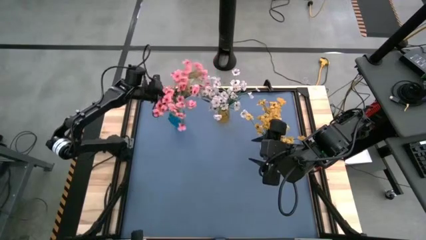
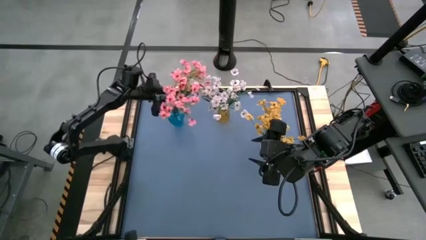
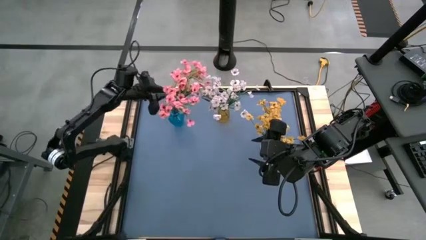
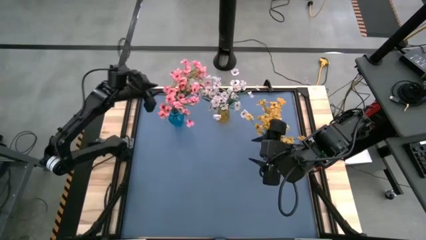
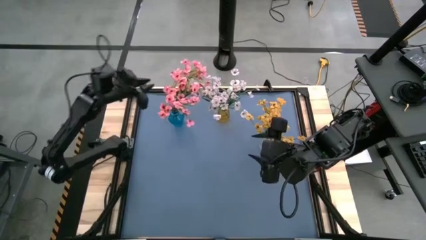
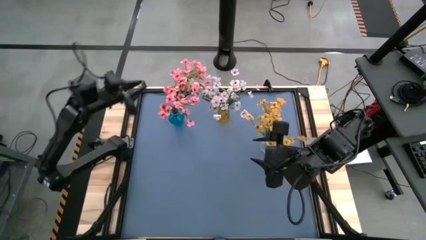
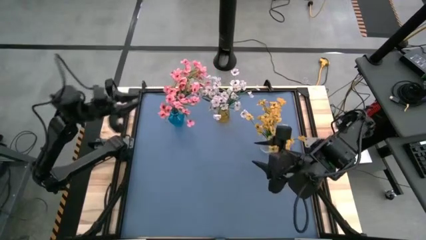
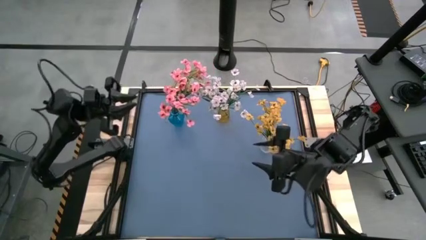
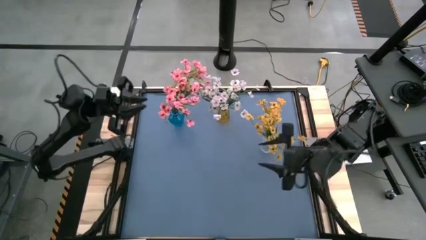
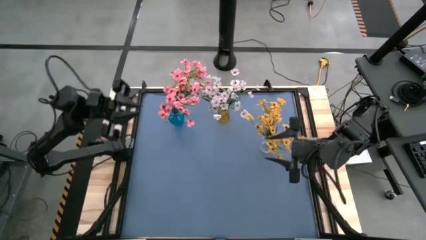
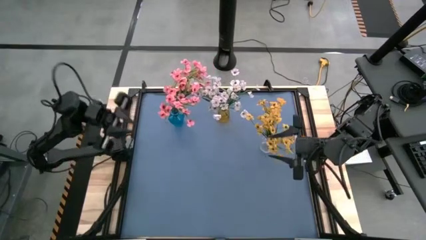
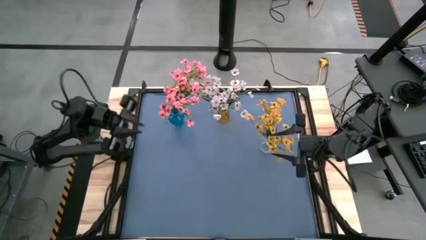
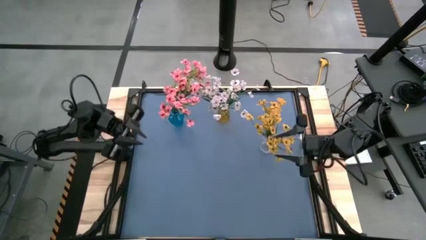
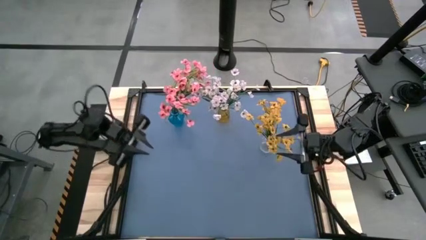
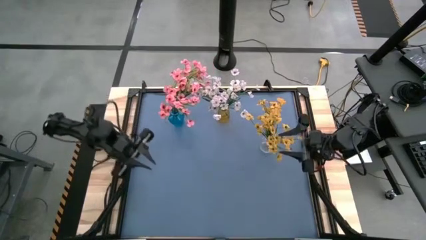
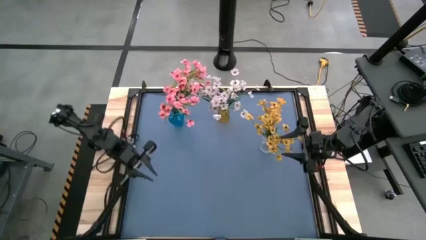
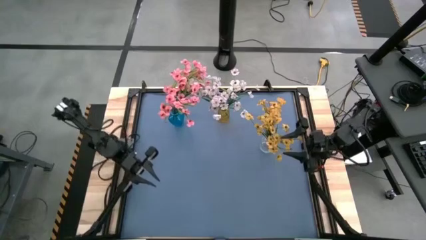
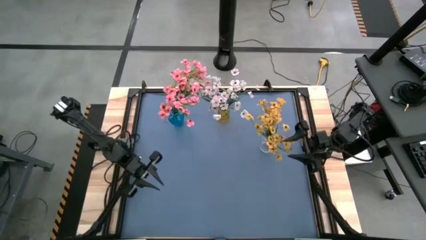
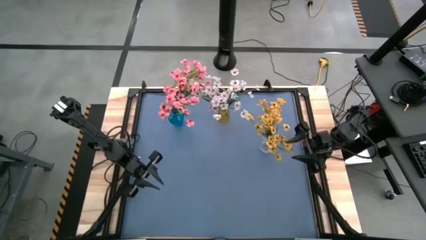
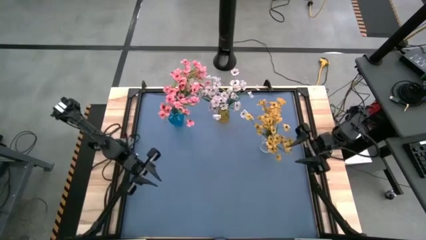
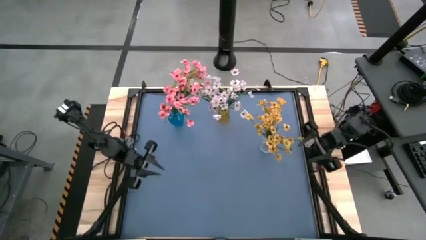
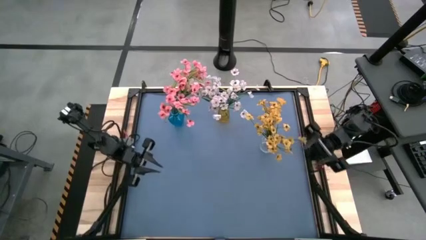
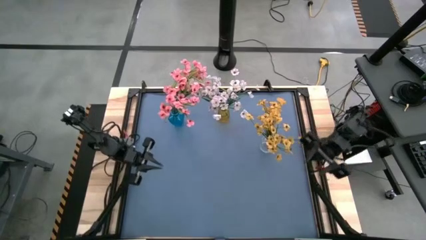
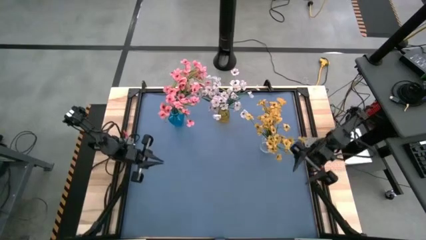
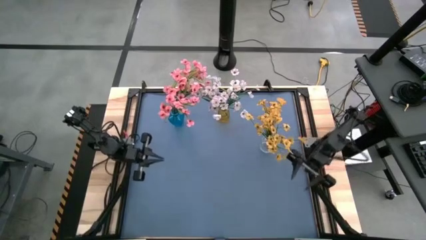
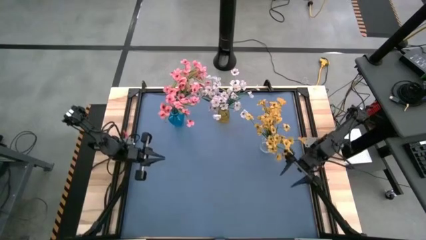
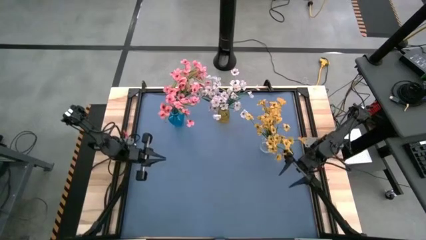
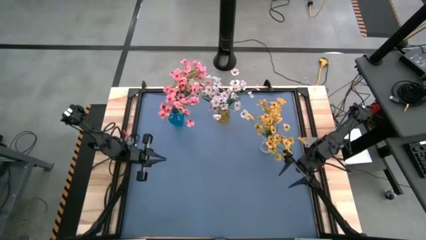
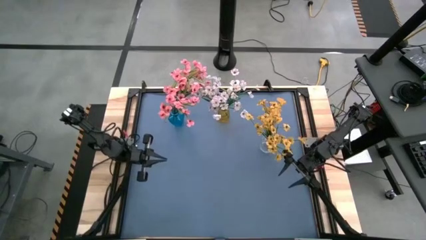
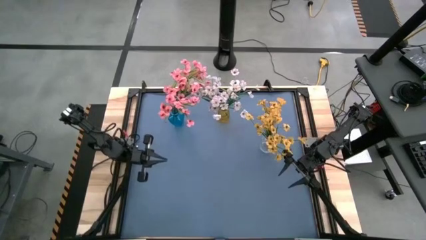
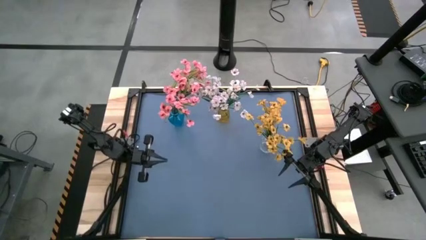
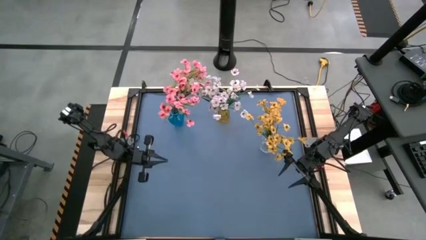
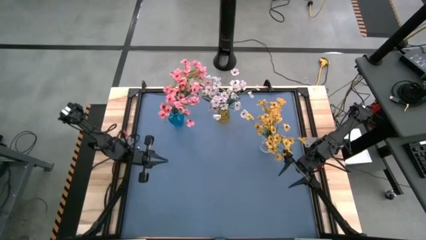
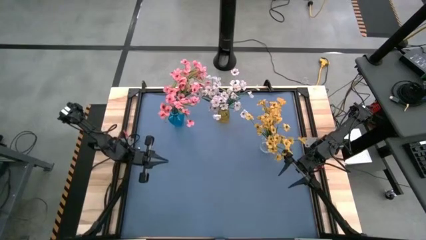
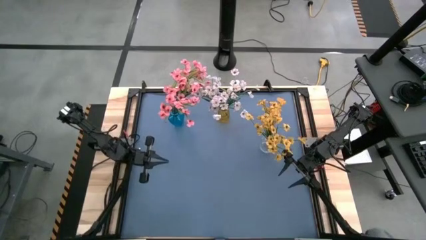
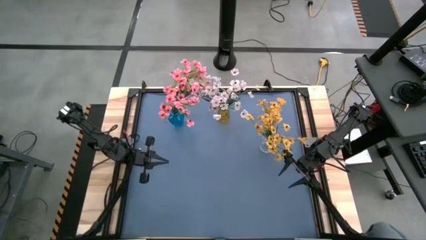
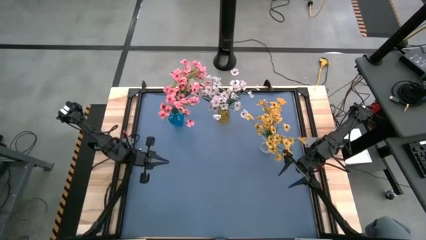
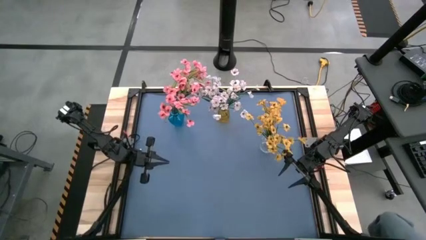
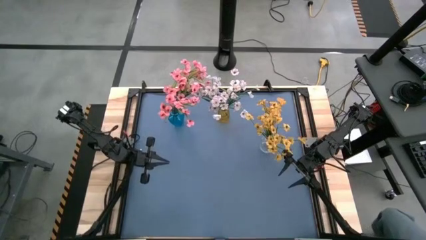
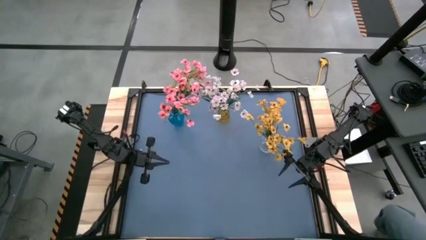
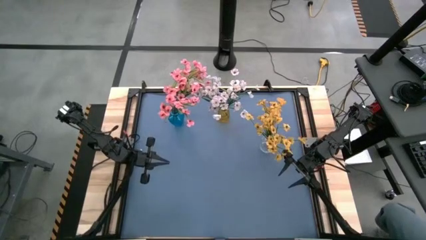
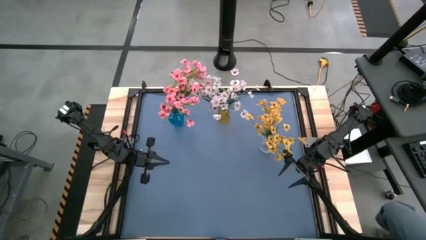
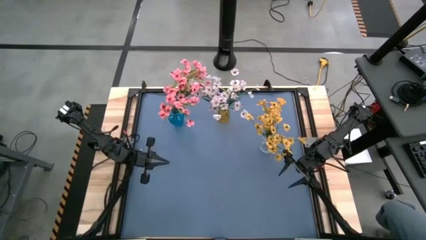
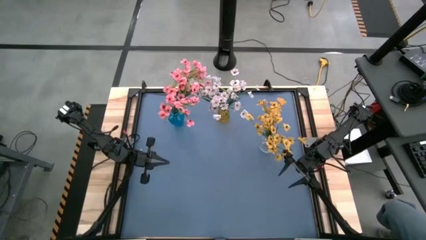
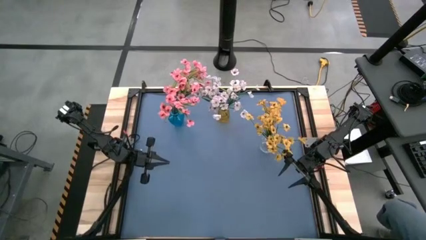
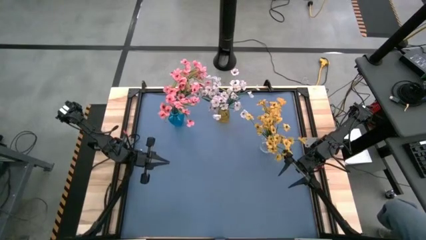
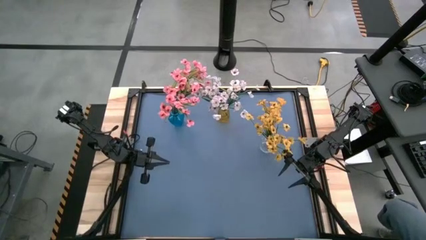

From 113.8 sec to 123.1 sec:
Task: Sort flowers into vase by color
Return to Home Position

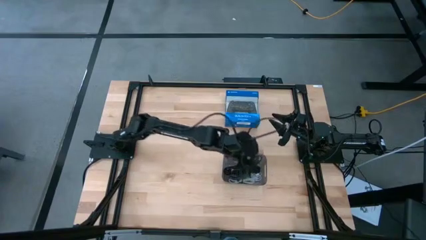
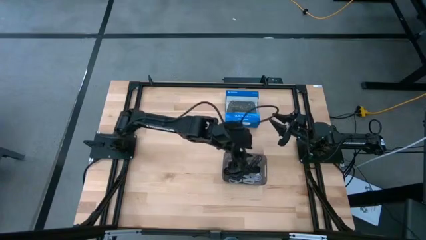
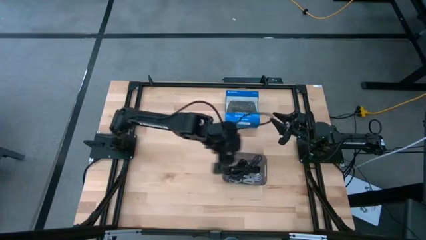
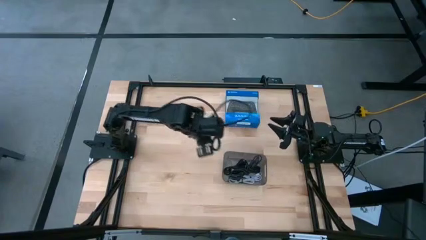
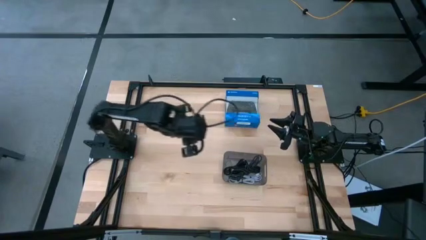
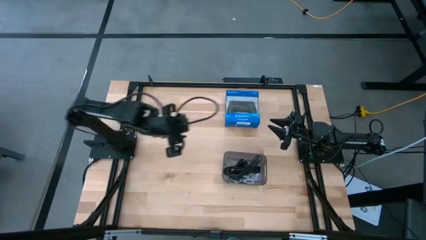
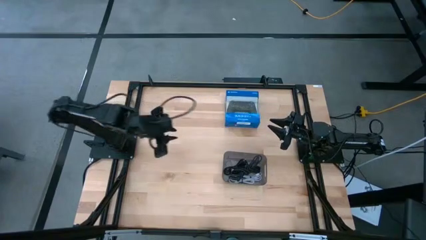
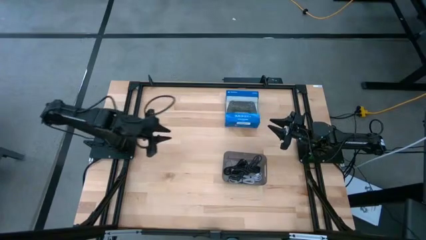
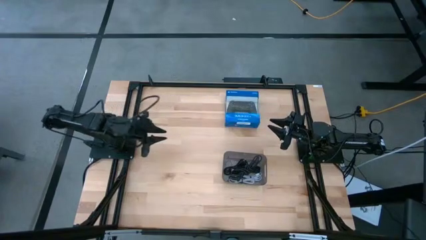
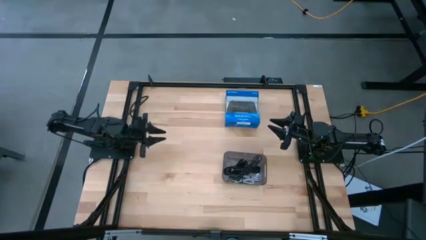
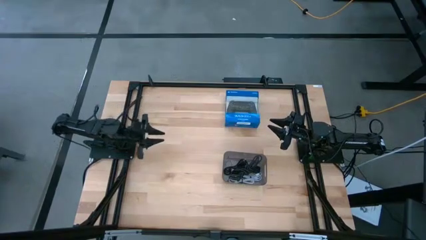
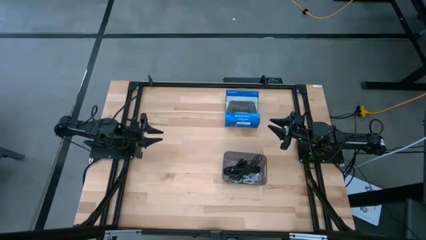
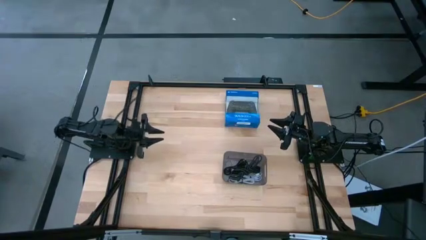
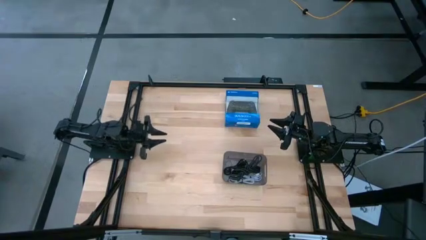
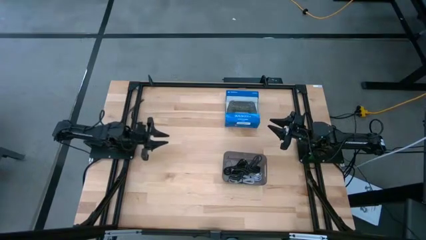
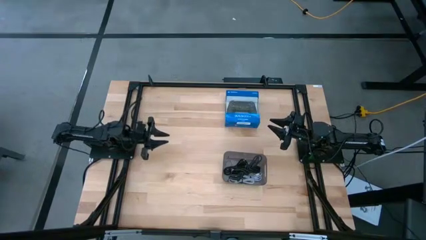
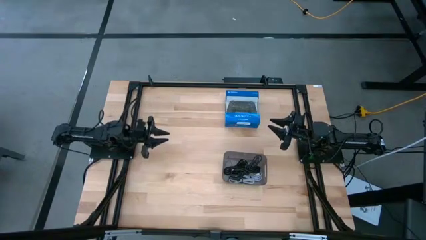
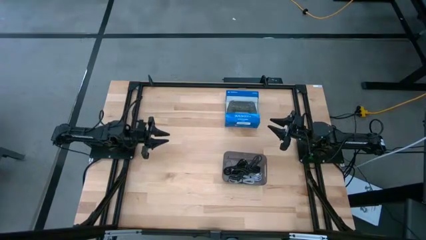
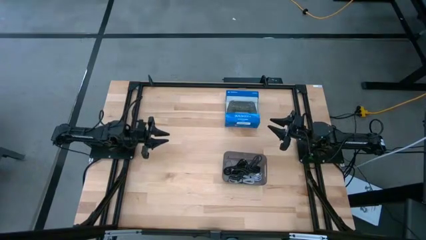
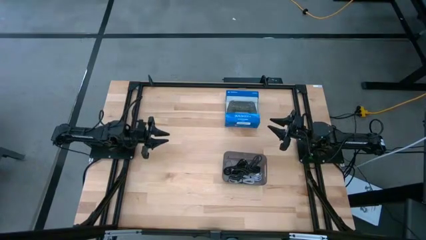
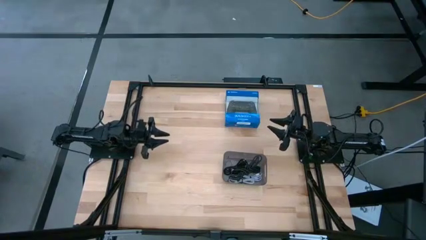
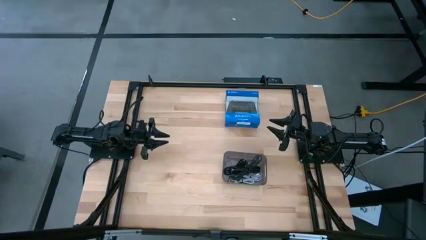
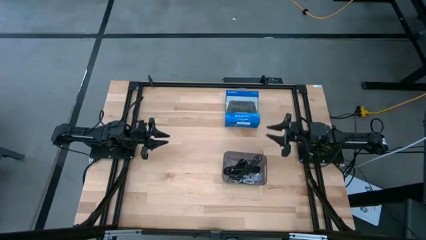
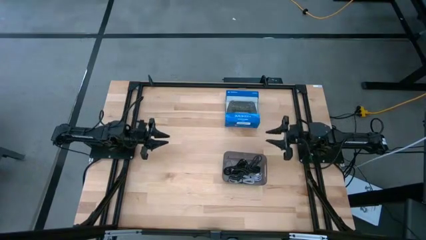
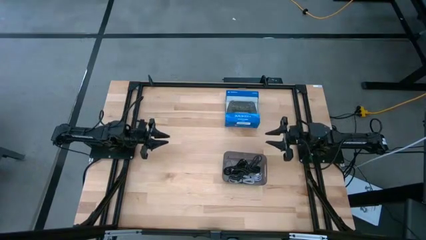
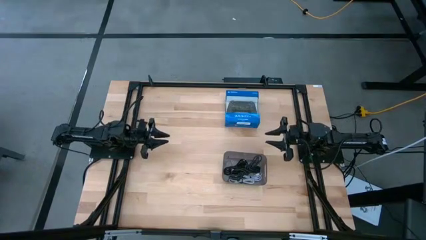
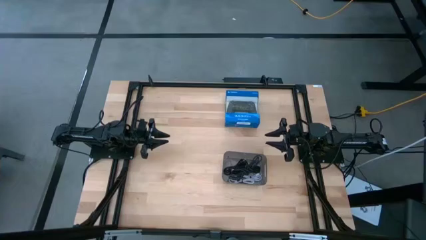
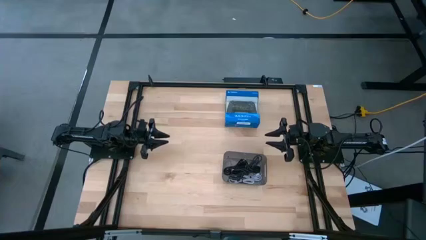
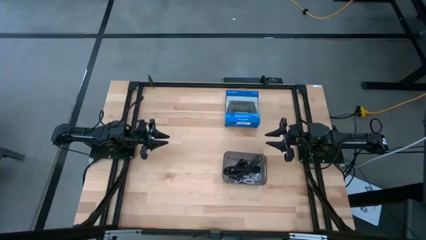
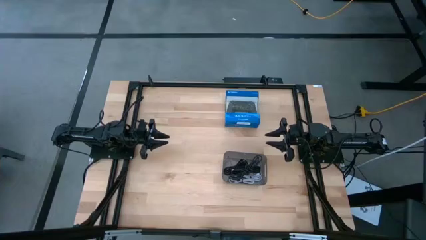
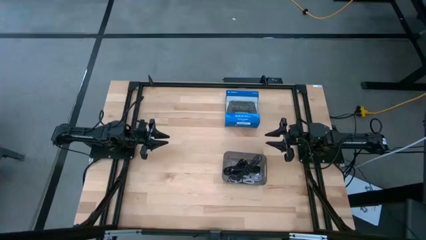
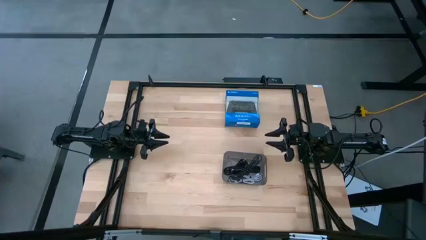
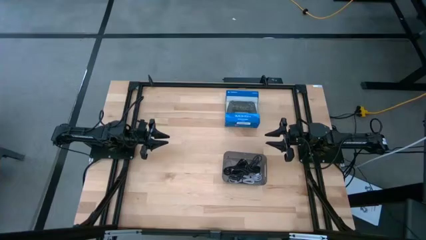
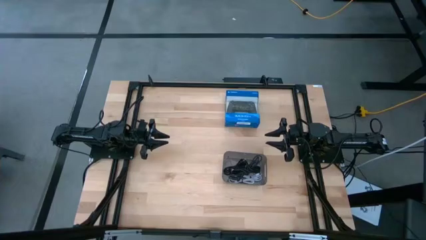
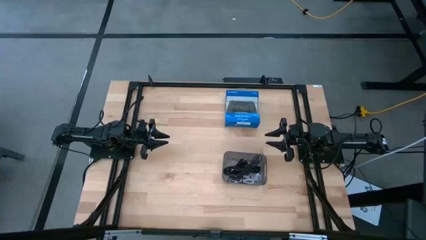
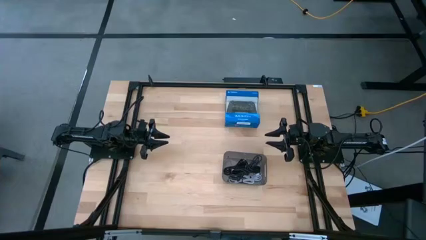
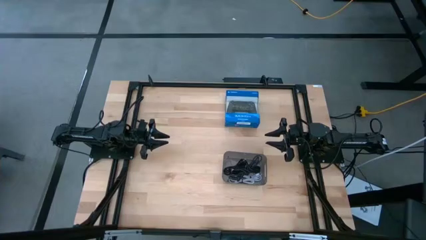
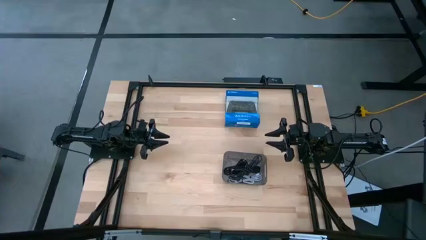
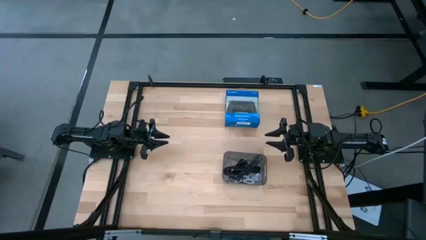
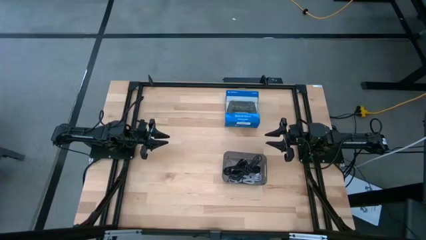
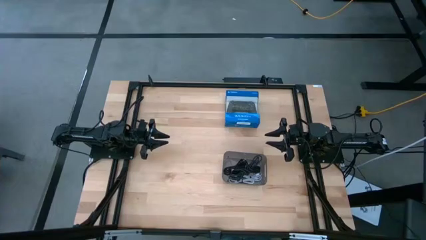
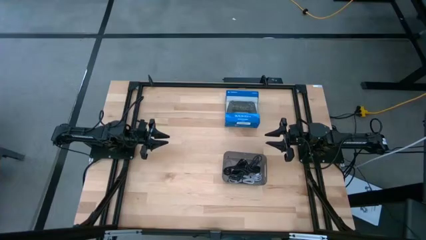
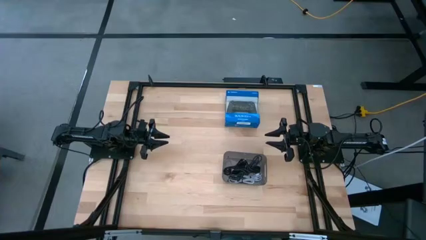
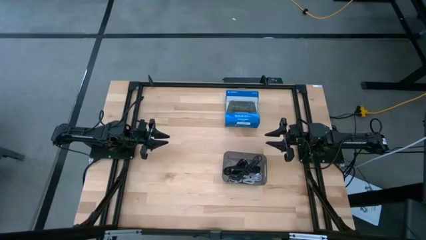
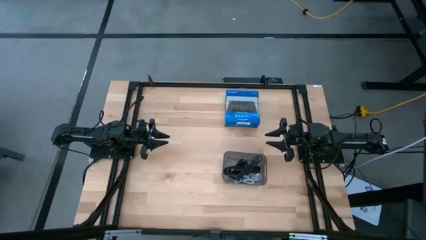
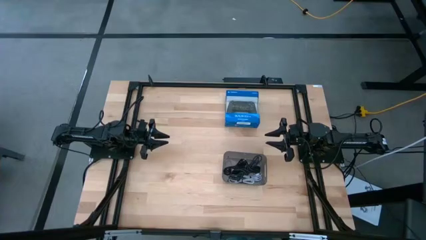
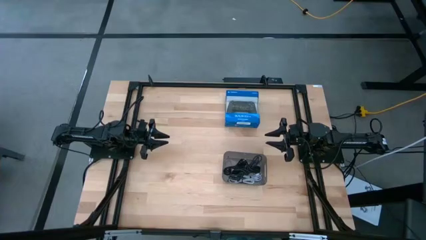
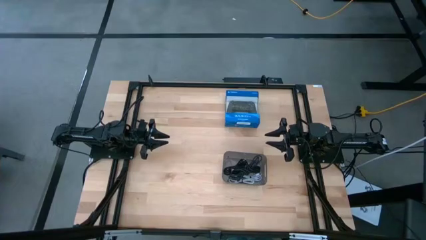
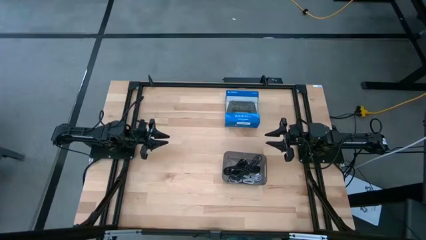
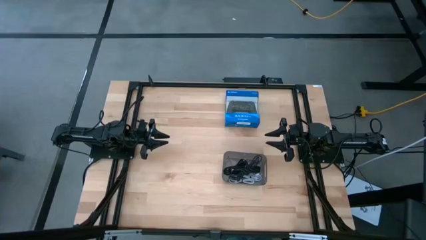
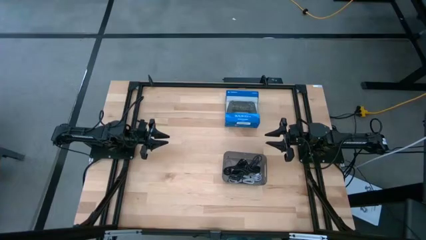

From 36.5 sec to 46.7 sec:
Task: Pick and place USB-C Cables
Return to Home Position
